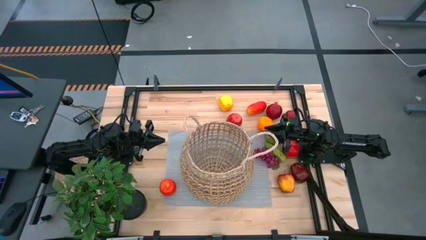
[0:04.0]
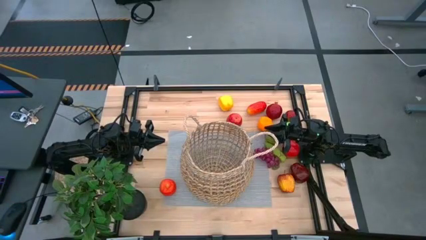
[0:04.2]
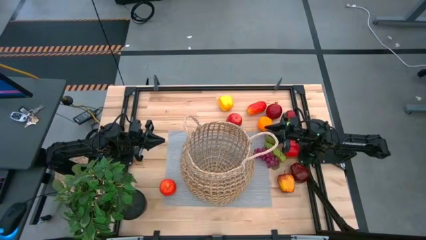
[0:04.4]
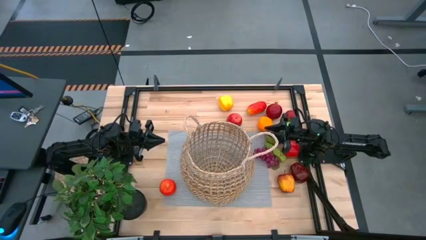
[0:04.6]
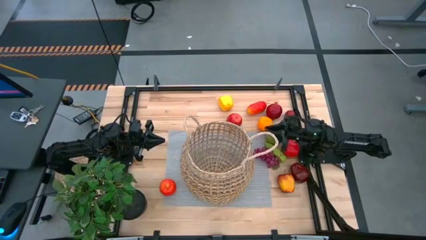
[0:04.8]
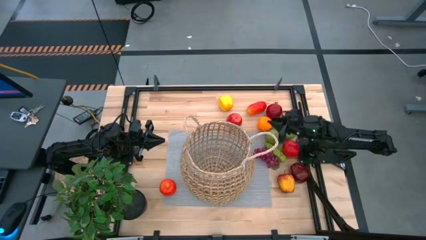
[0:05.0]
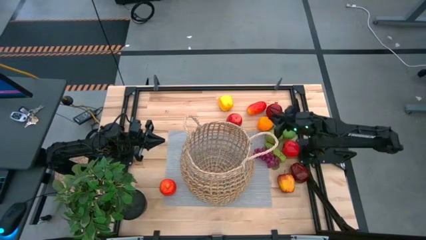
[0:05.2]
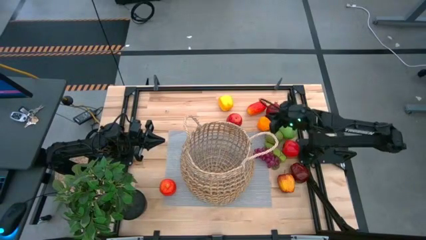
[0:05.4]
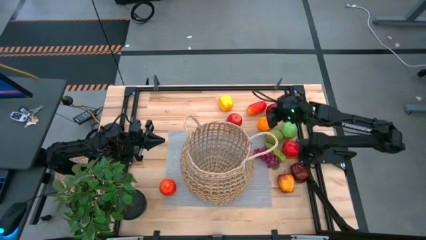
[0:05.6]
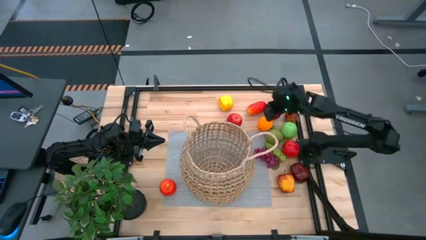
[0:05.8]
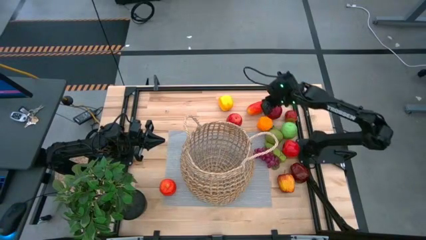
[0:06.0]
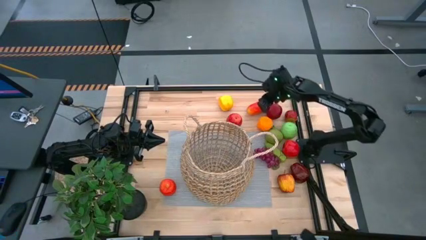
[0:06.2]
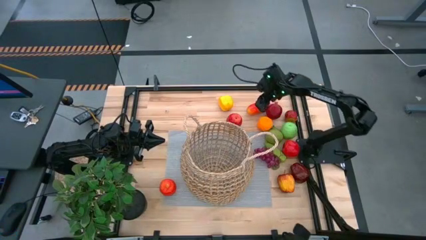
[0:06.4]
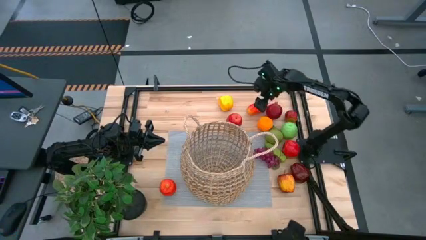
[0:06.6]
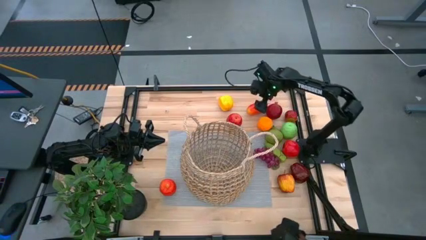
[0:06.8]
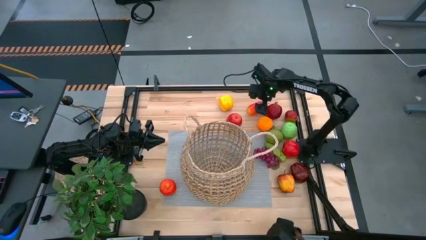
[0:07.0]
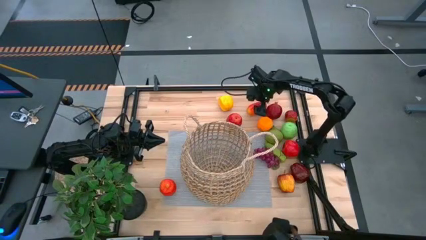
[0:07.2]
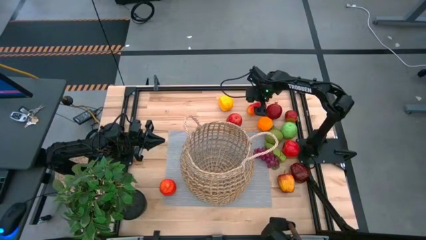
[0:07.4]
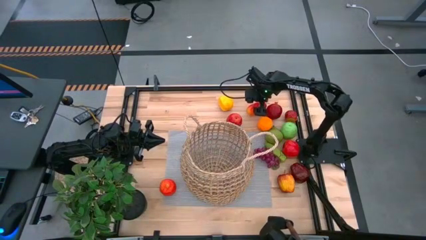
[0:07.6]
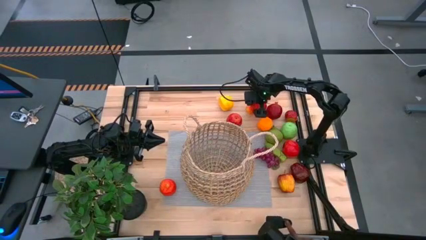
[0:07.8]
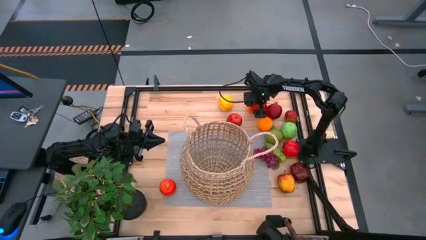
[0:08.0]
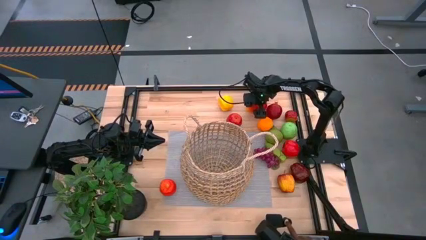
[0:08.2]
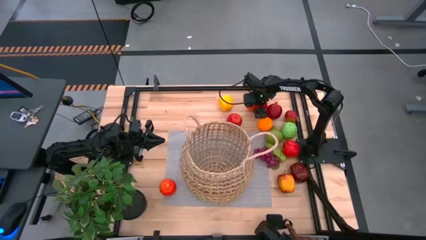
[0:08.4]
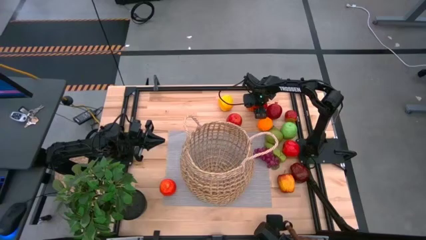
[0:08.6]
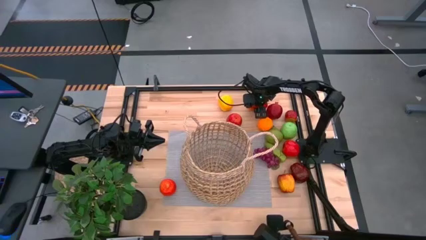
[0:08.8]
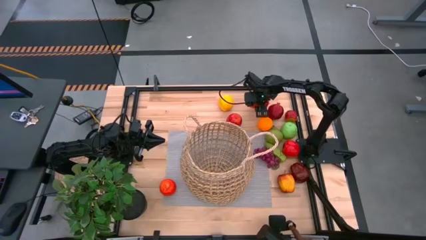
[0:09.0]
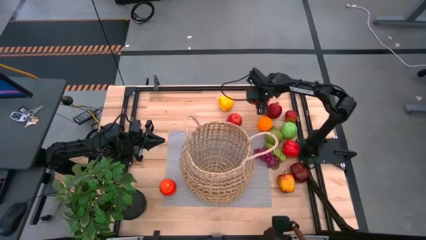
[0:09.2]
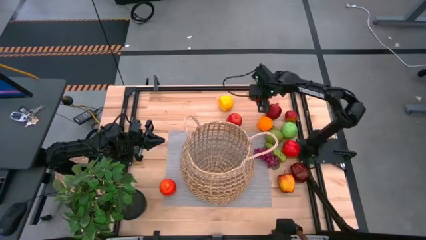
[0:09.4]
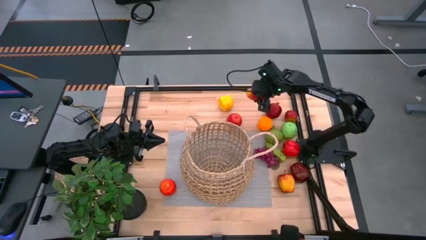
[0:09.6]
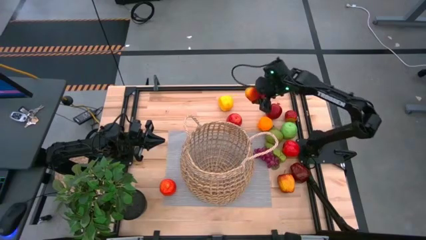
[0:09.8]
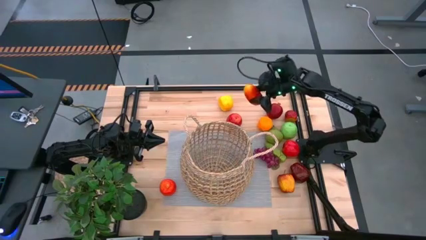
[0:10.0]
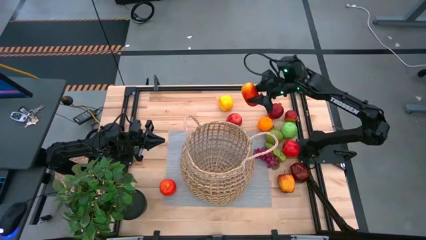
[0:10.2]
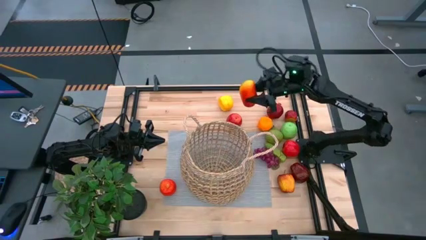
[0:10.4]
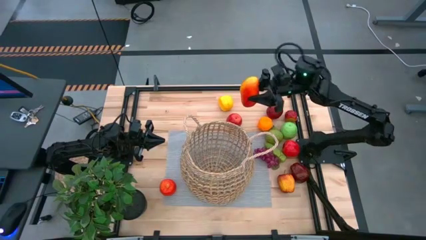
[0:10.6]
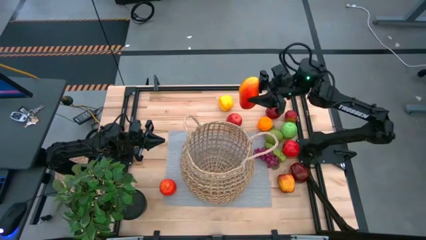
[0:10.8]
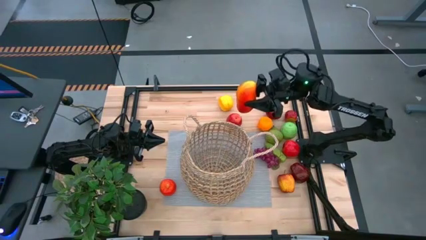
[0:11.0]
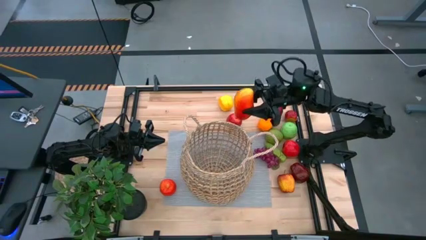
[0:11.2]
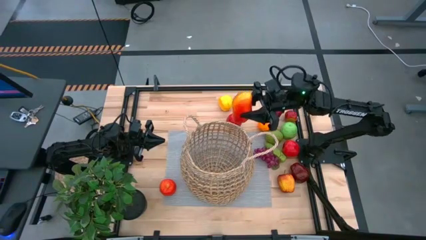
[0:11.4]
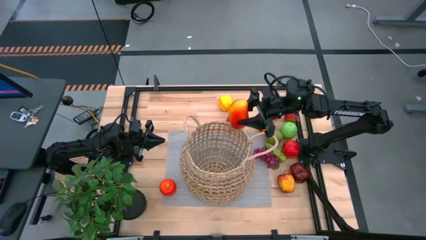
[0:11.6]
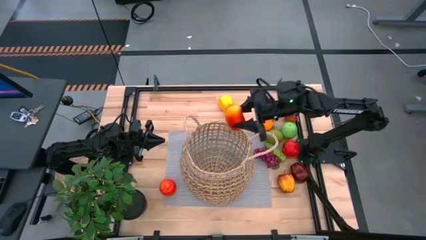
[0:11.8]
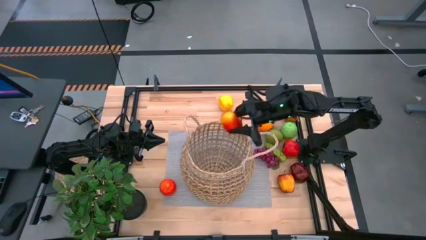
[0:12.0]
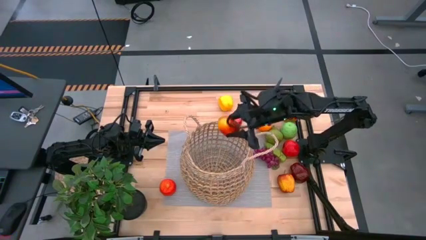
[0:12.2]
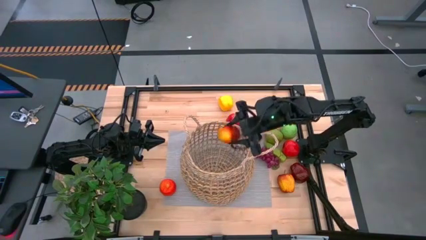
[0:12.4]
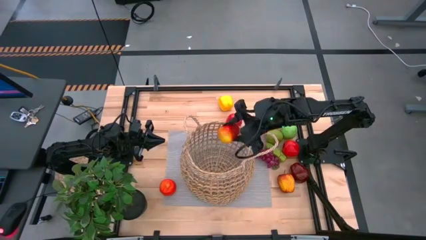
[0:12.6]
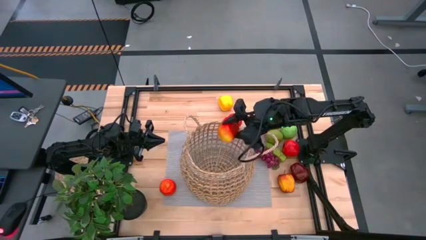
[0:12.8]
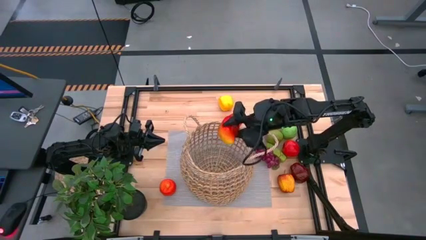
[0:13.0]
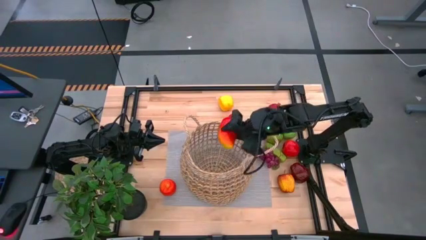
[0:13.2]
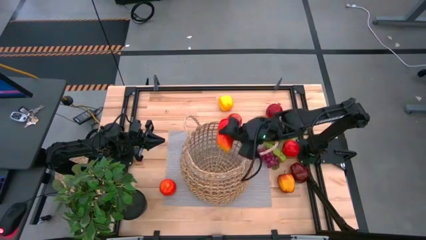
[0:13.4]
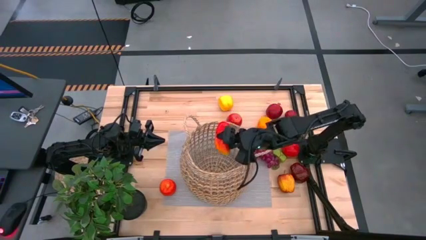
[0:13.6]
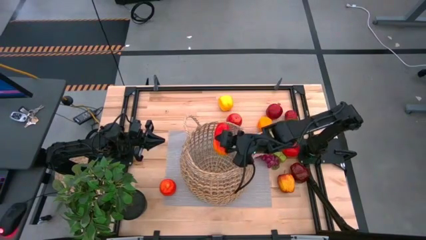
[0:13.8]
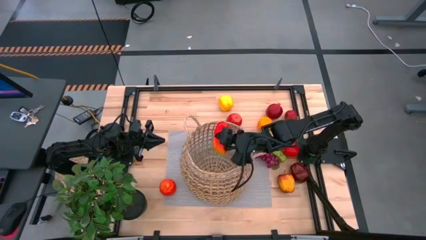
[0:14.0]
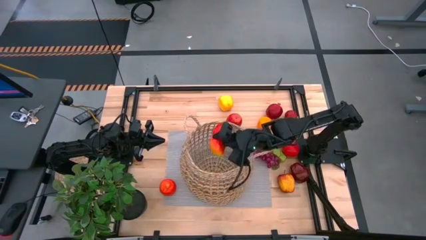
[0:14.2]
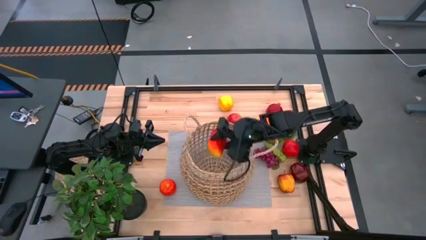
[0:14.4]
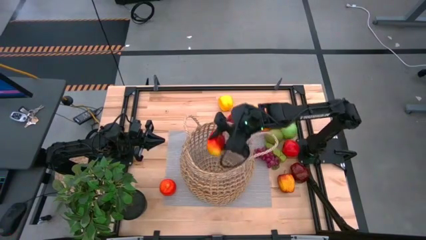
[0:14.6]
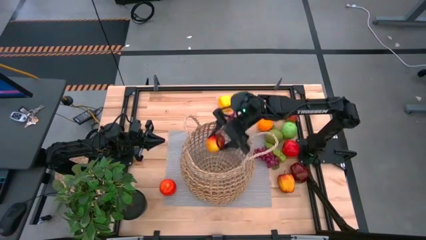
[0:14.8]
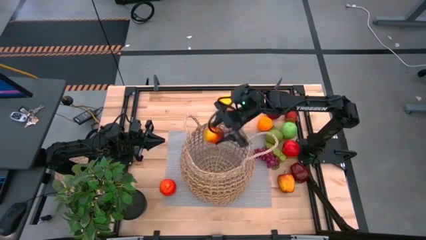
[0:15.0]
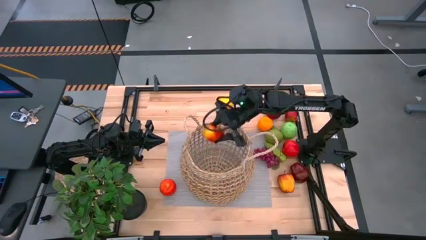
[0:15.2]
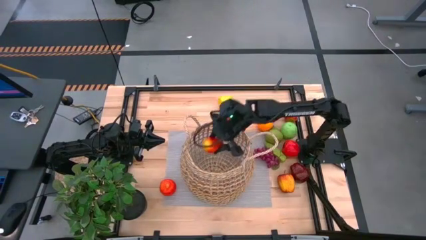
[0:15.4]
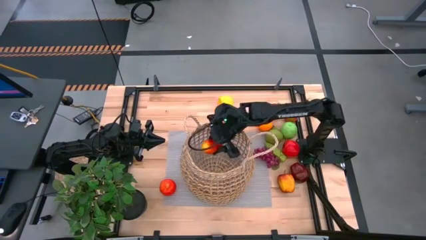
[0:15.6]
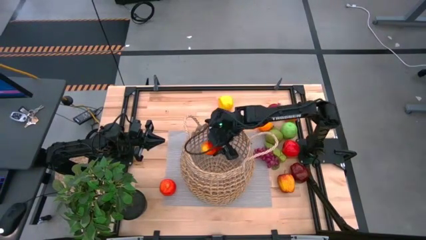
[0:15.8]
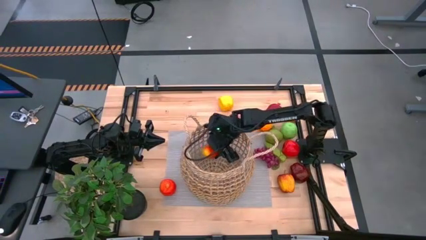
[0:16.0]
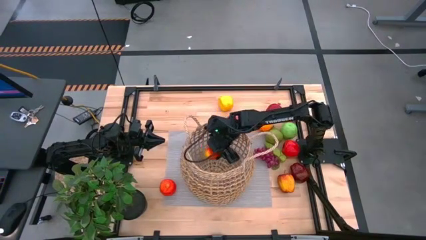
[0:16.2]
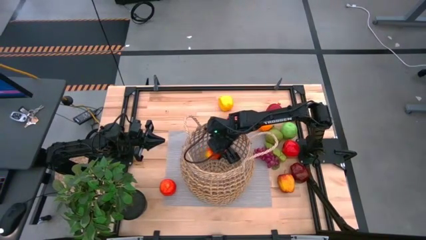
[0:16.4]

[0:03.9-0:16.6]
Task: Build produce basket
Put the red mango into the brown basket

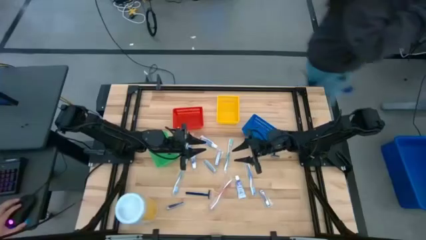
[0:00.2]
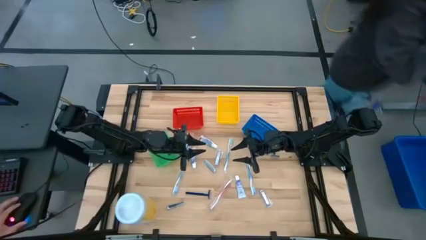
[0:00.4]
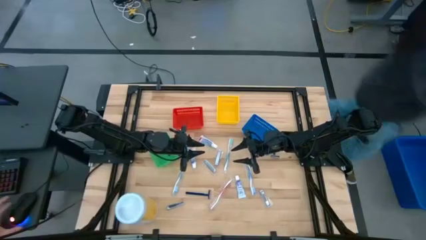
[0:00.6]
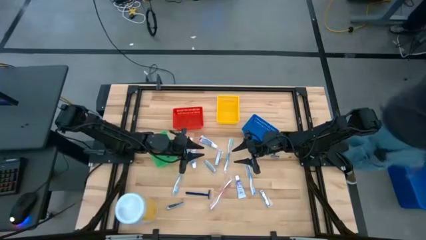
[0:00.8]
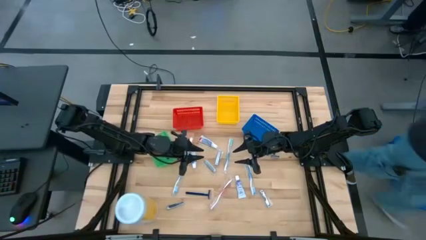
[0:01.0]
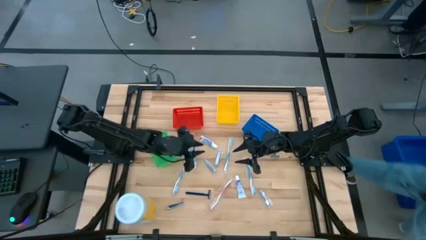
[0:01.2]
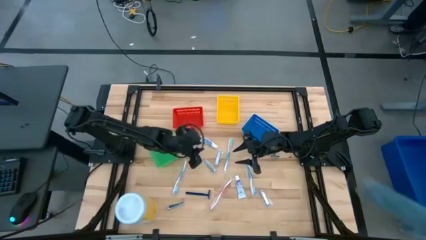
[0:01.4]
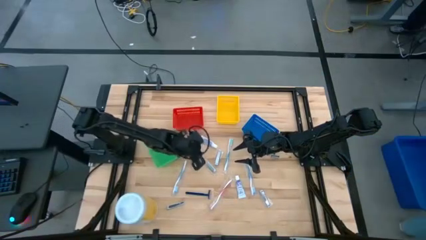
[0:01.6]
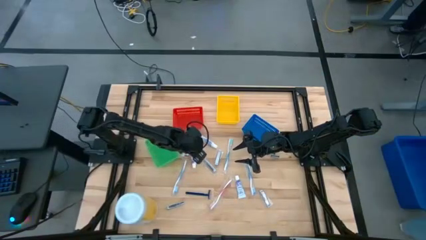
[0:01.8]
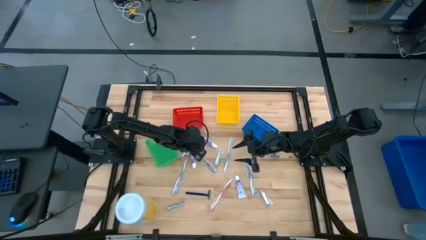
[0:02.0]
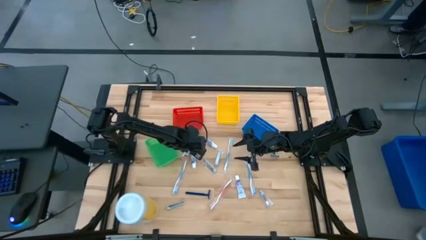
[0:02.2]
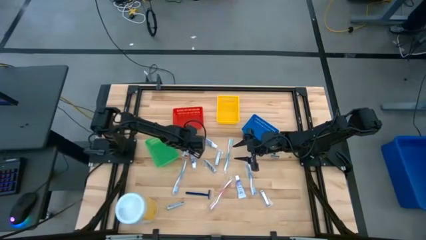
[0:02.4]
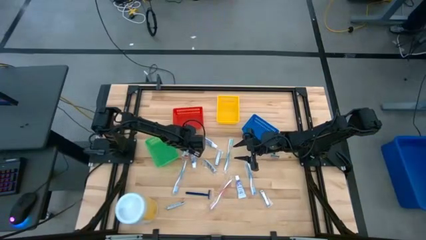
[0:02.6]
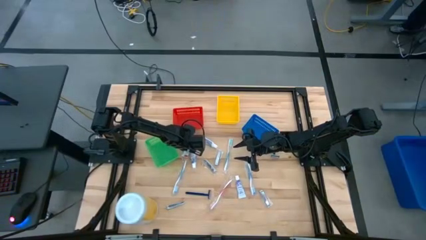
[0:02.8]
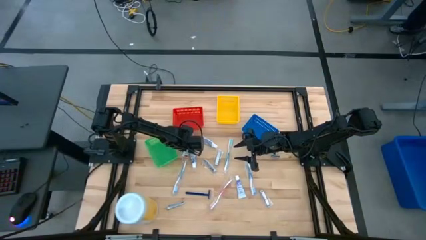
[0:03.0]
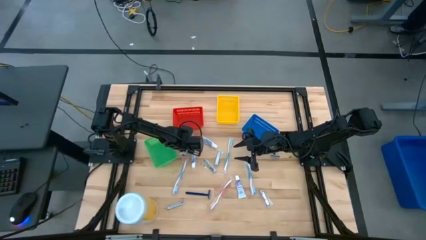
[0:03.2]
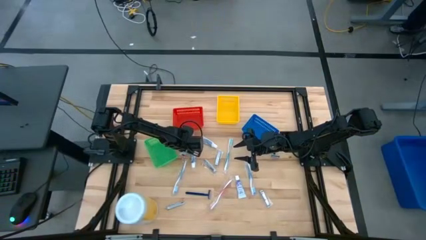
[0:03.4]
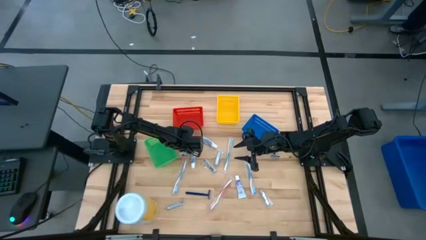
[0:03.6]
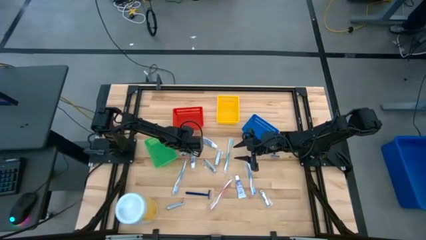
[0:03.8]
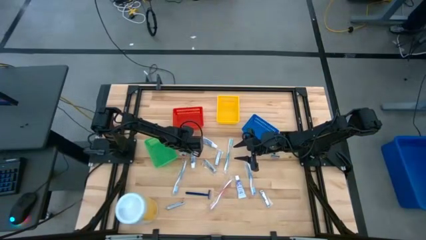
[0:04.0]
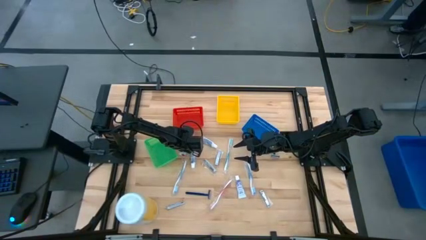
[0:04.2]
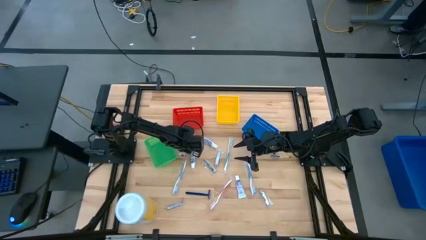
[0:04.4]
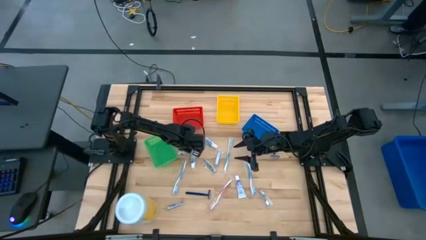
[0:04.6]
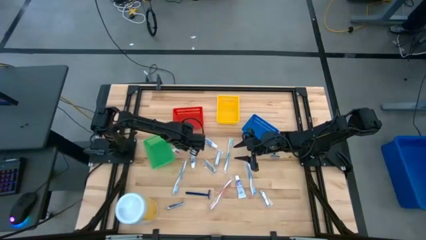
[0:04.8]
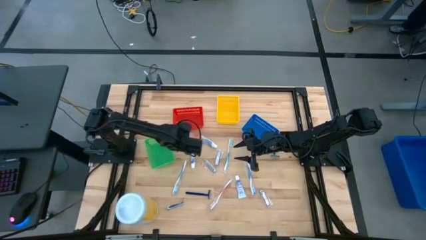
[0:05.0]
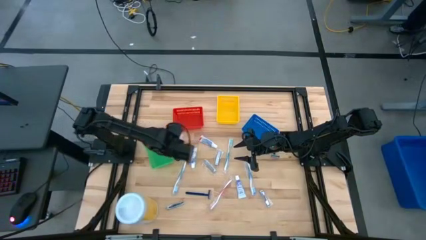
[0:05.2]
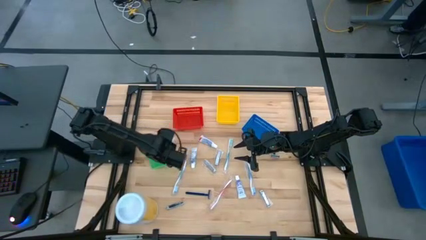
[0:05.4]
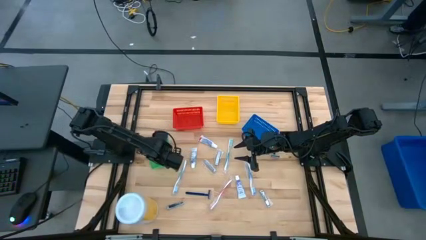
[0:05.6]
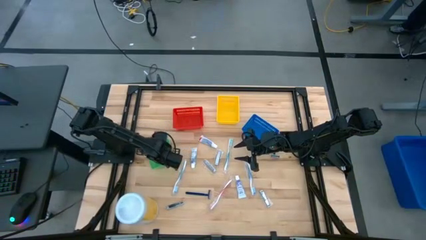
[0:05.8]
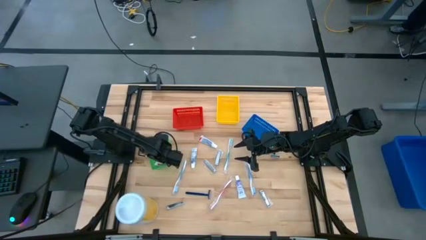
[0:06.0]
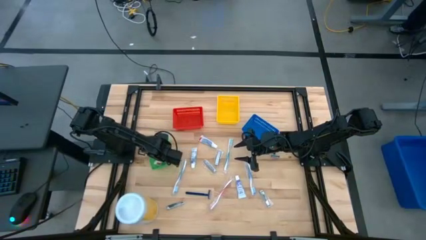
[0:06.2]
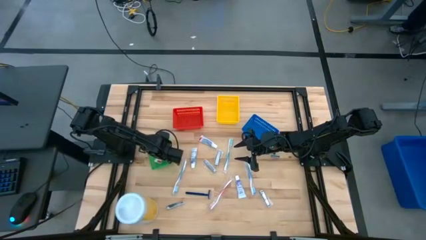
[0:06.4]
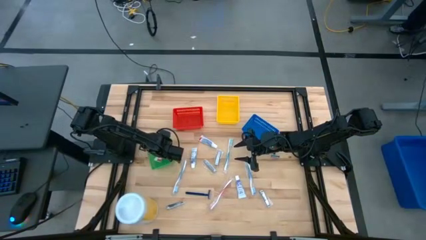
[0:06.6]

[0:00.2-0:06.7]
Task: Pick & Place Travel size toiletries
Put the white toothpaste the green bin
